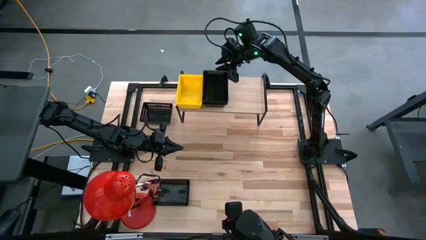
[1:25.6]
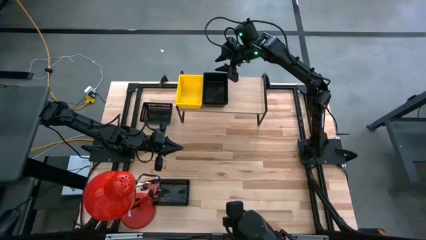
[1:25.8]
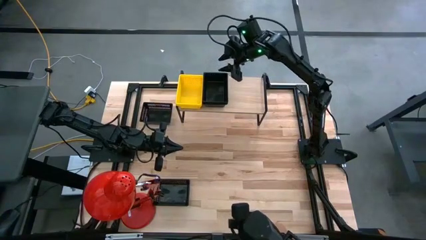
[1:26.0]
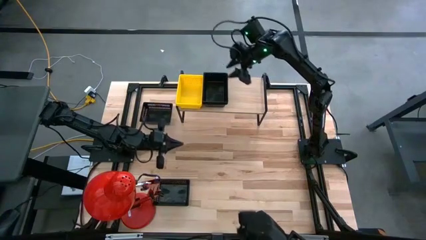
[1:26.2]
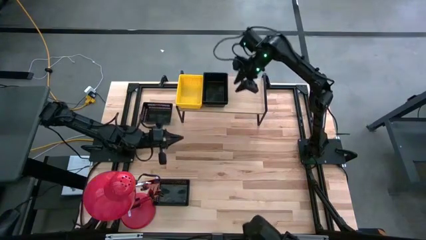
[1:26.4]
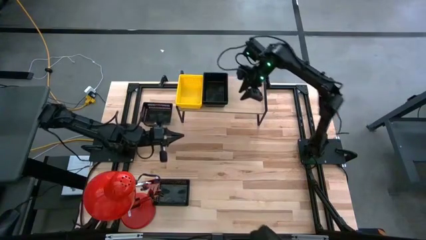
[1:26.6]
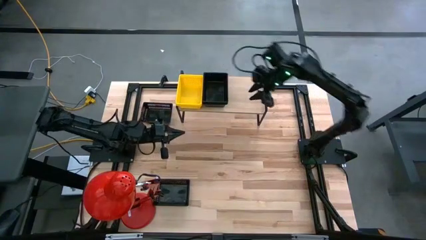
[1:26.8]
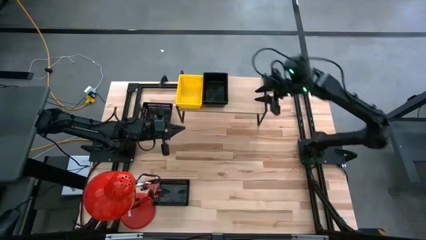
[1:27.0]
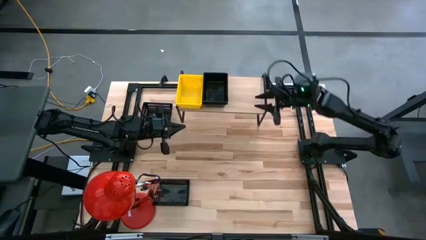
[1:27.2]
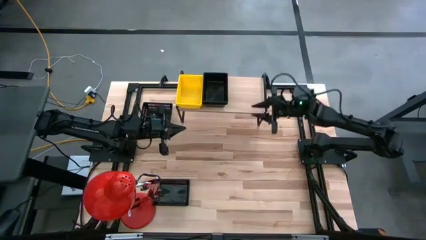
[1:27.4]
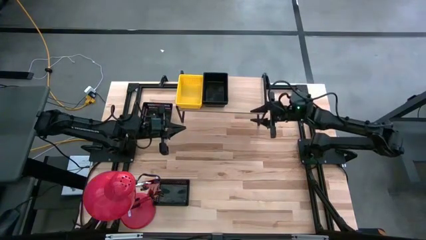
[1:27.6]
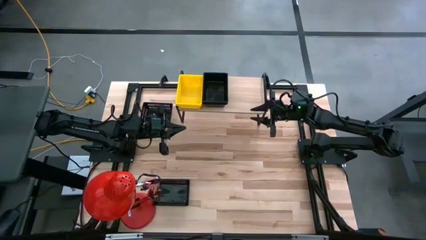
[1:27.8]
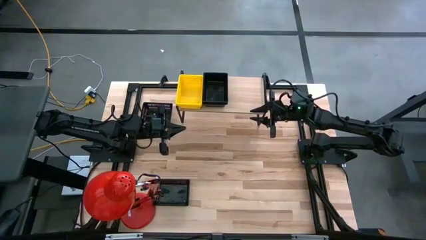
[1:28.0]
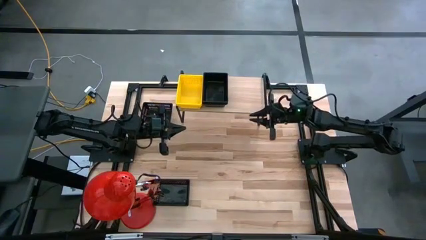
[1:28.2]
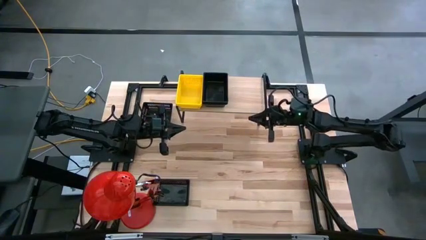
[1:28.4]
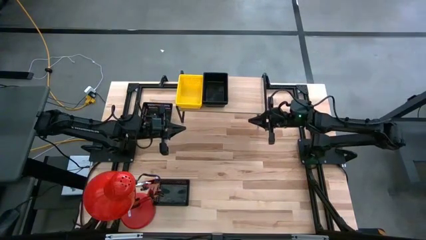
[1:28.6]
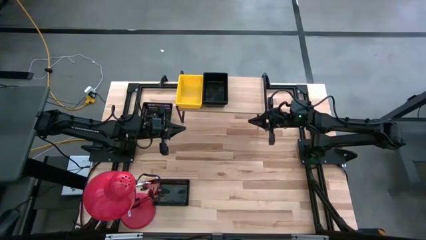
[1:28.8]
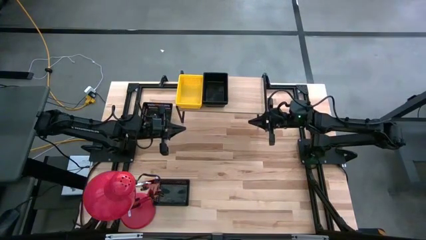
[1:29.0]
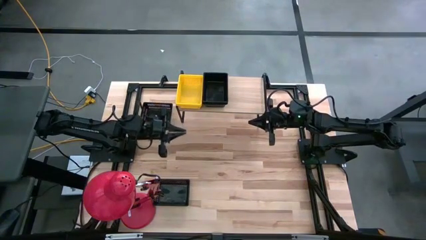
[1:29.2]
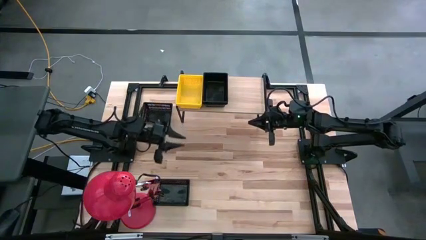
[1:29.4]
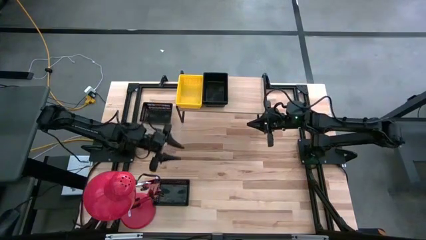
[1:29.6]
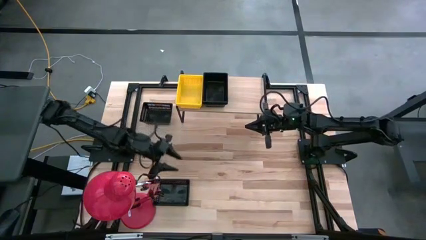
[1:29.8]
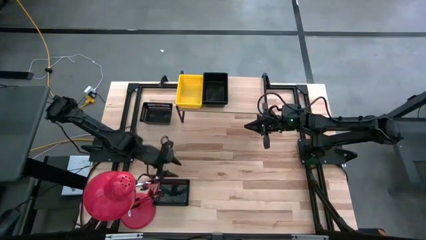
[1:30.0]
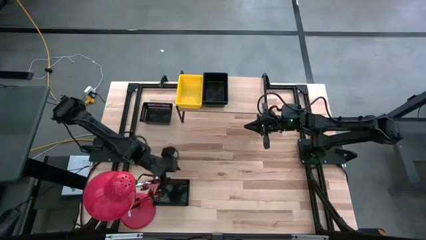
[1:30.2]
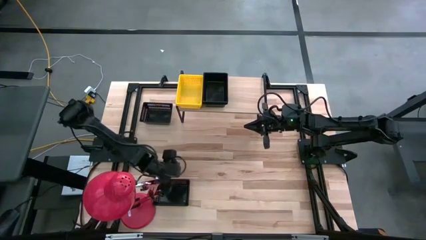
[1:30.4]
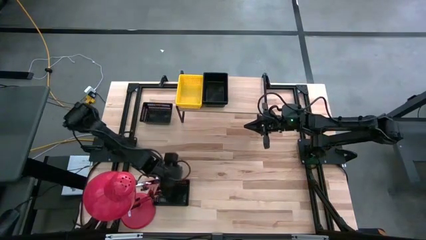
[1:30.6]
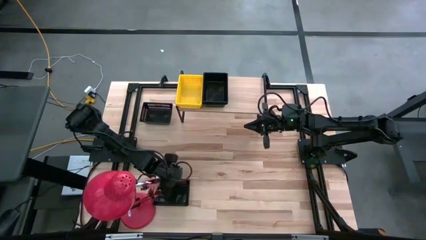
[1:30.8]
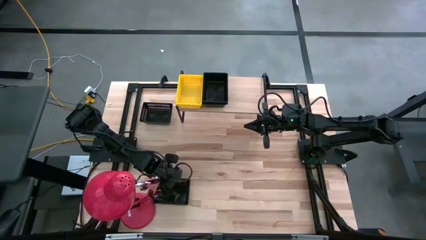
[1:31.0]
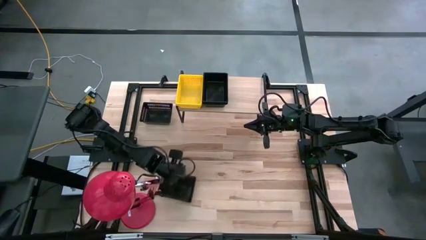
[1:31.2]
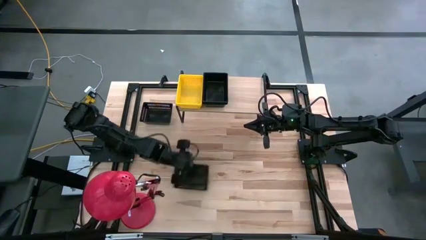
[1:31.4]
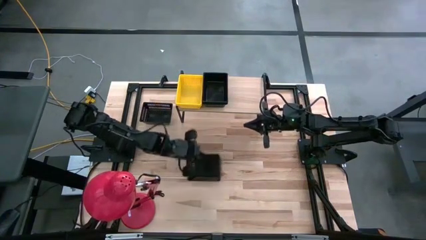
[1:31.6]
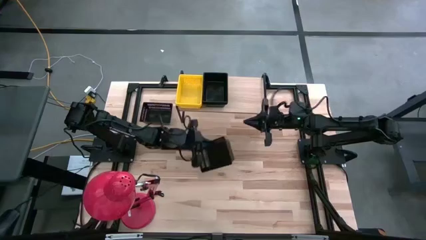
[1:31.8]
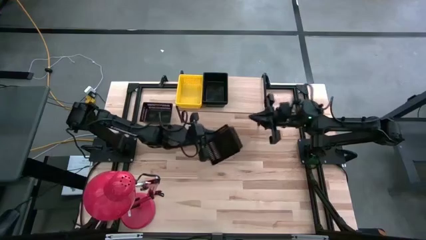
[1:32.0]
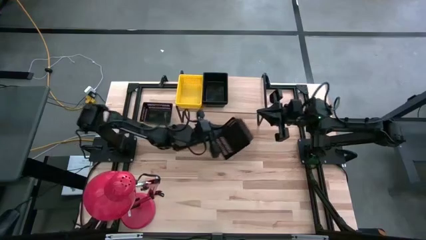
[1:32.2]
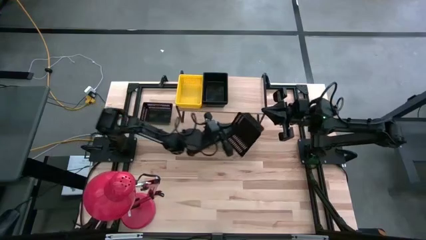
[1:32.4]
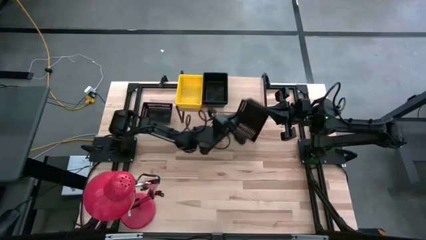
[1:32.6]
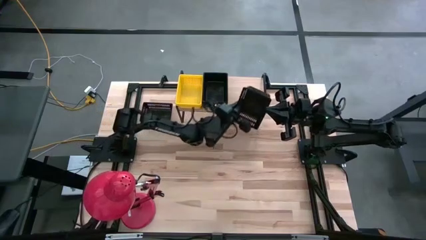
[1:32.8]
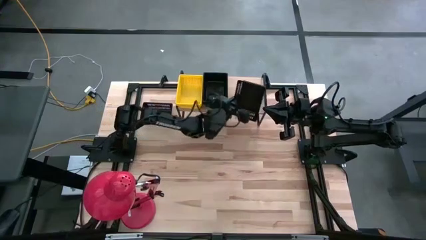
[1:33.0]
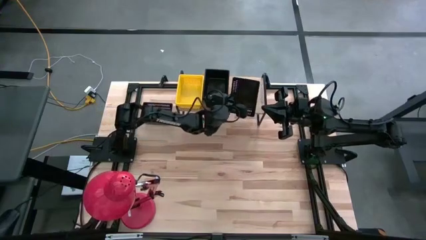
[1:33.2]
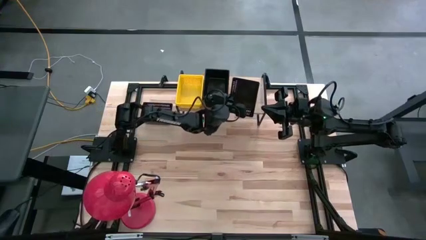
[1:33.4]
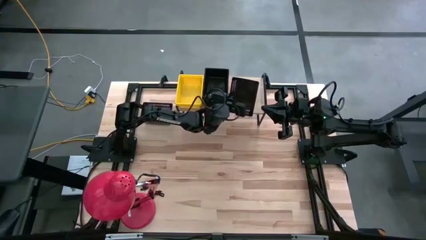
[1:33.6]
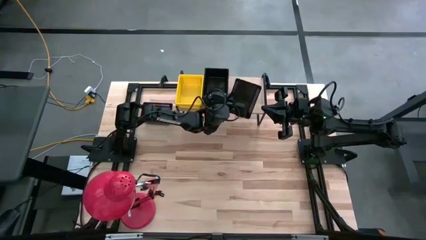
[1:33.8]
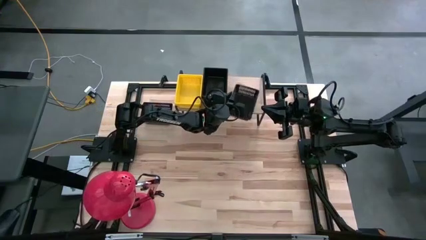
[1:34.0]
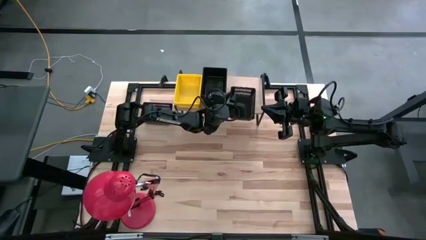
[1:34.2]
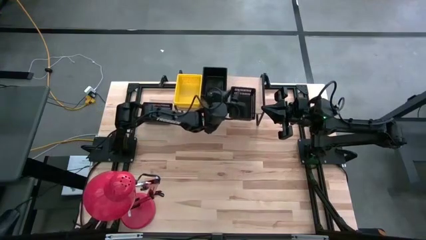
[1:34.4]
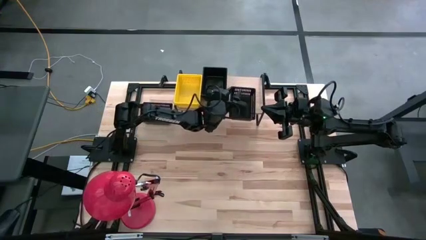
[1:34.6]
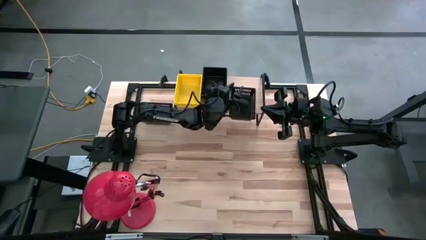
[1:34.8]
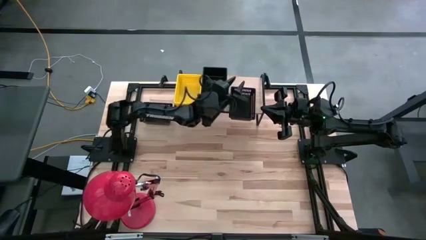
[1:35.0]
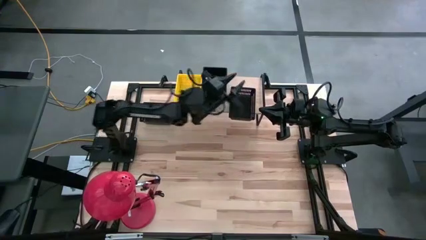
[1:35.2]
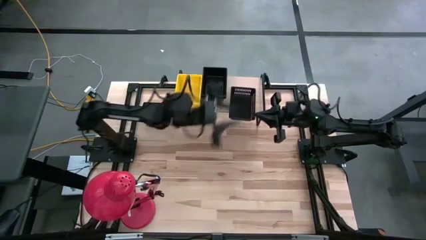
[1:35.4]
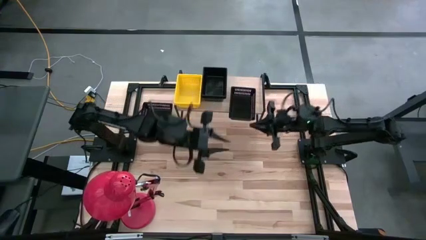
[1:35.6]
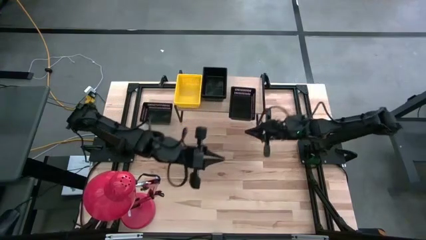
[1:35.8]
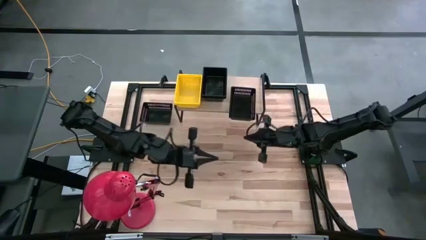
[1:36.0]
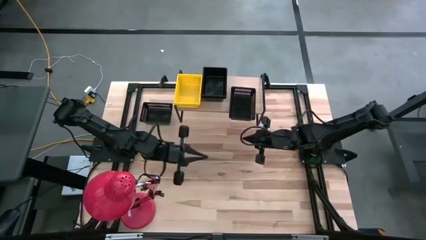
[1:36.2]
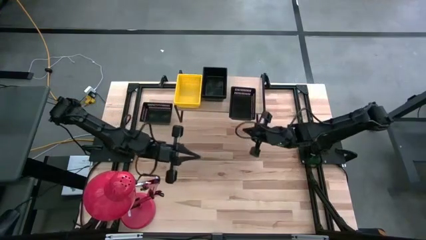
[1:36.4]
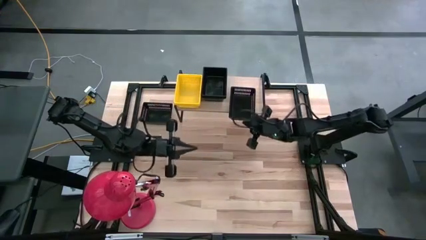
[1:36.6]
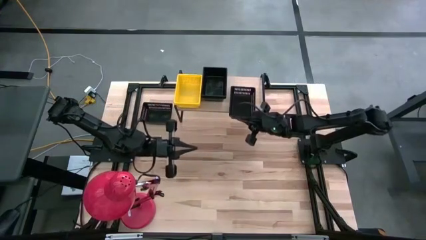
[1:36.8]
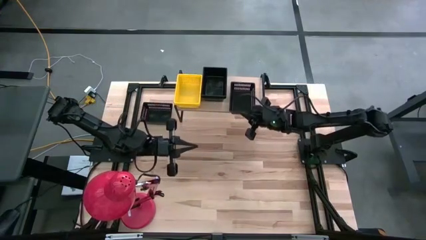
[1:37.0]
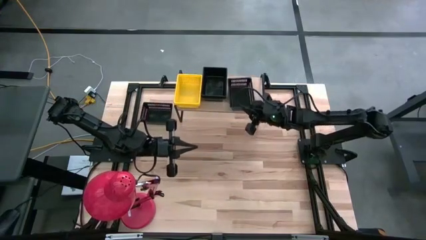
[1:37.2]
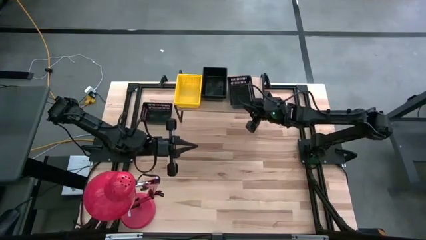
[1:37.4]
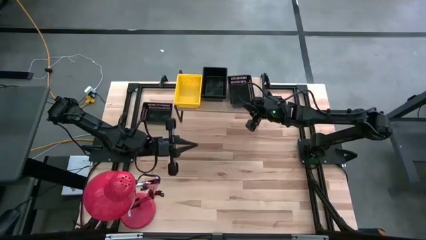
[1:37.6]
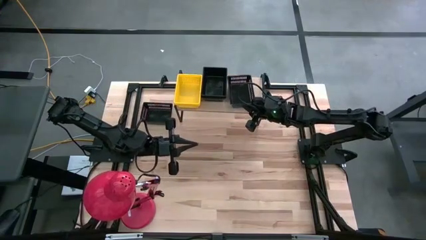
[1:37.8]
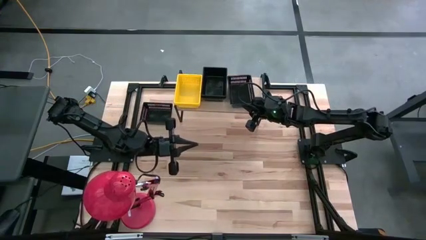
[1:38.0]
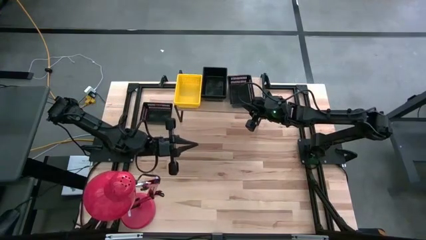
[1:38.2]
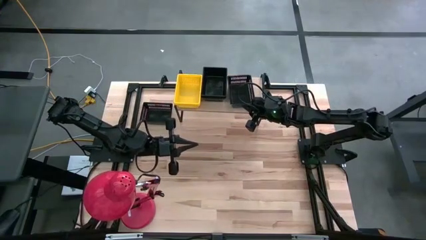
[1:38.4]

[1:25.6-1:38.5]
Task: Stack baskets on shelf by color
Put the black bin on the shelf
